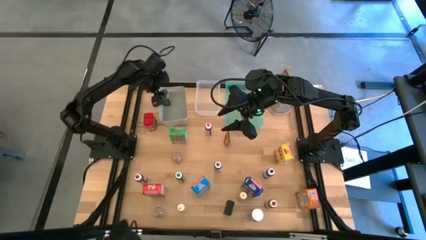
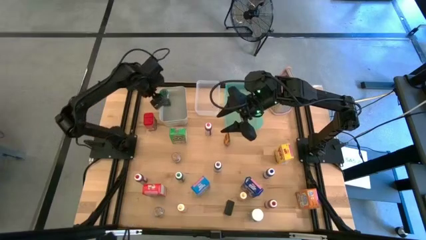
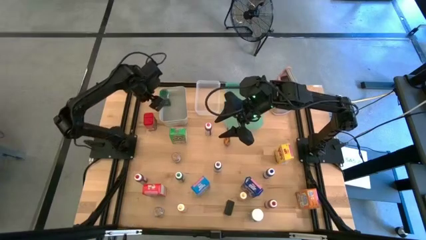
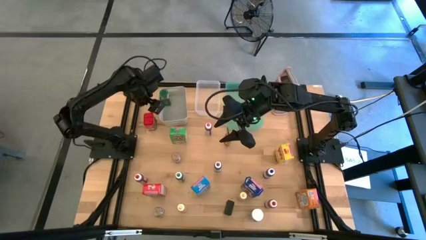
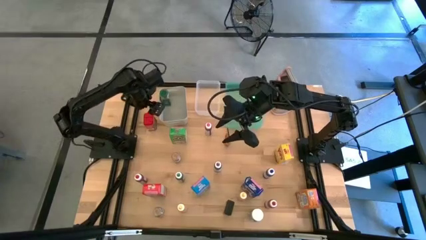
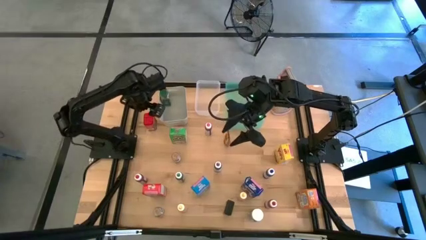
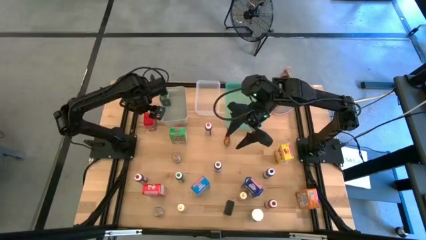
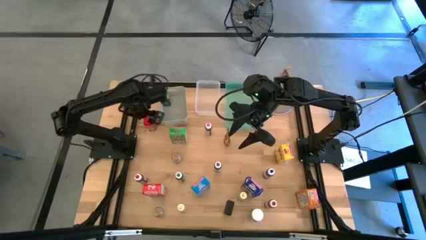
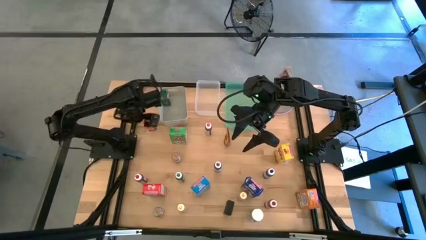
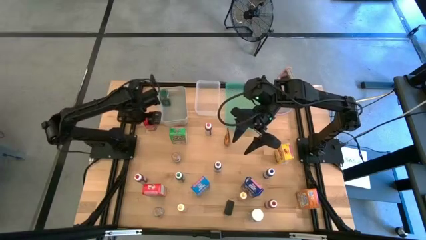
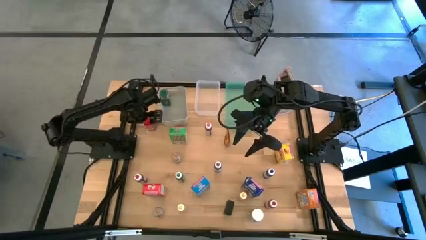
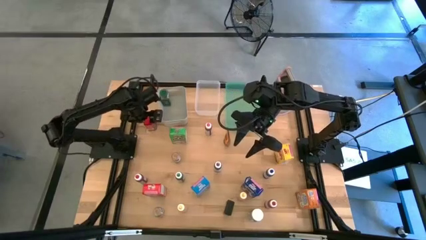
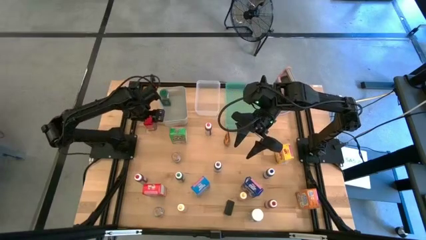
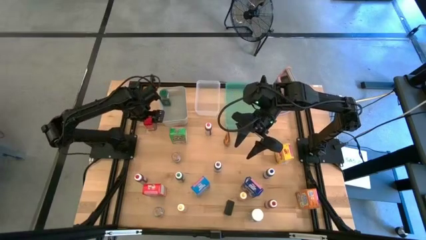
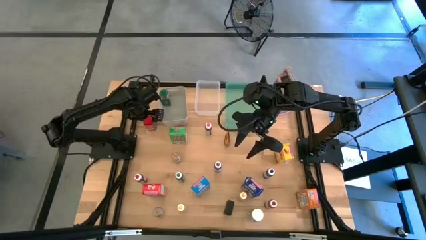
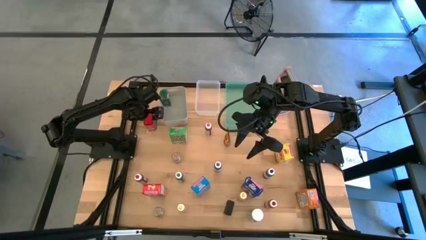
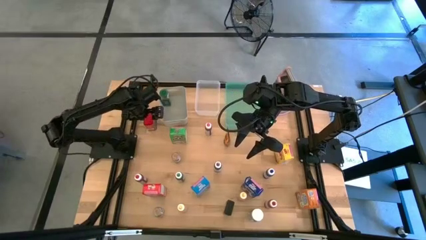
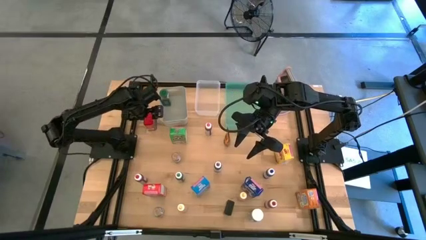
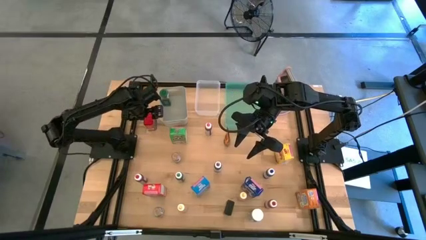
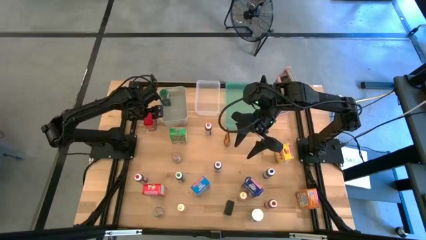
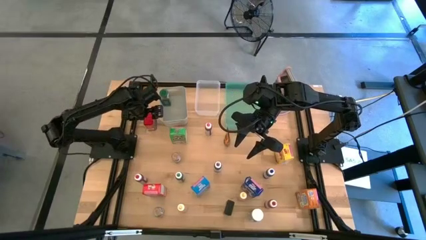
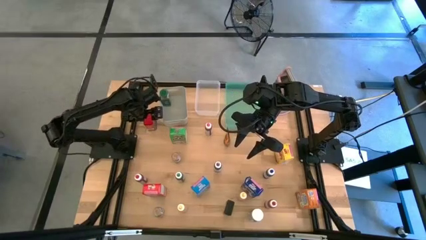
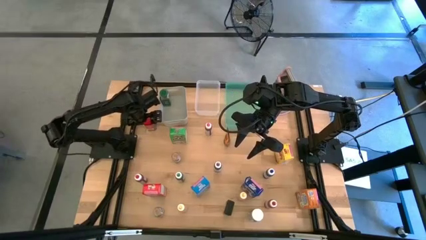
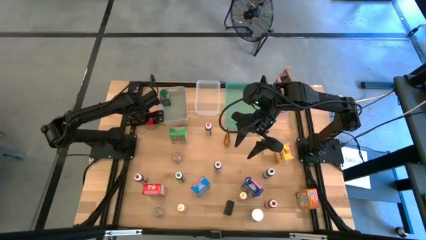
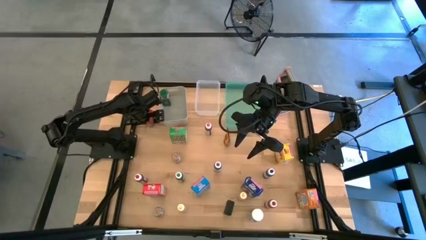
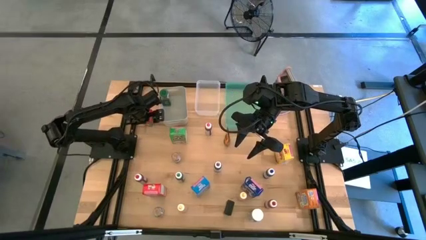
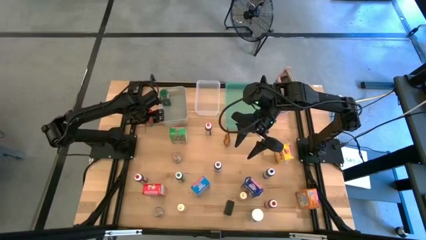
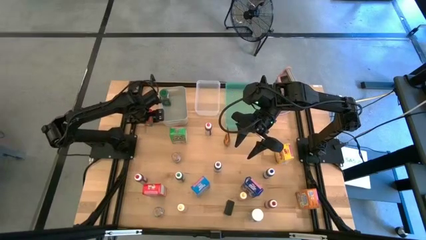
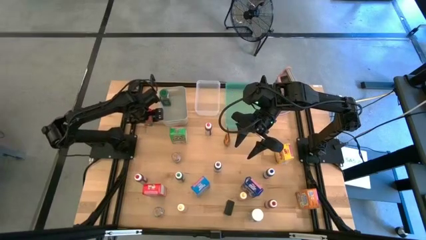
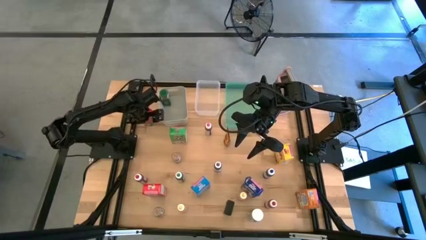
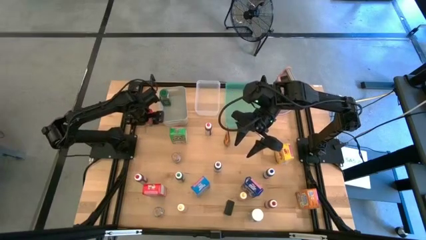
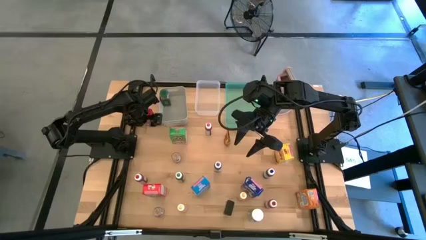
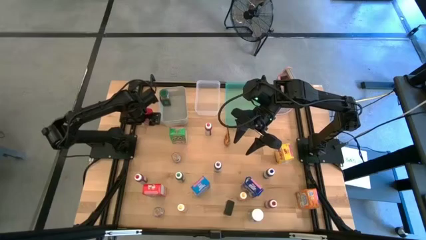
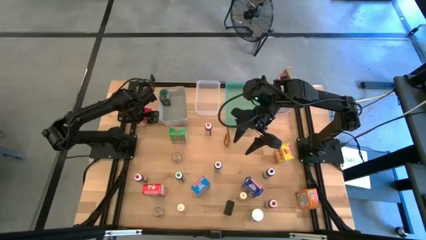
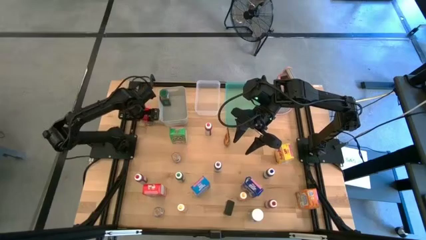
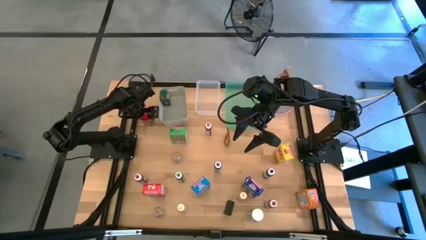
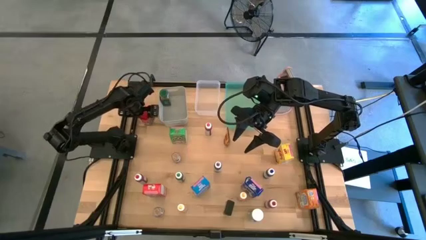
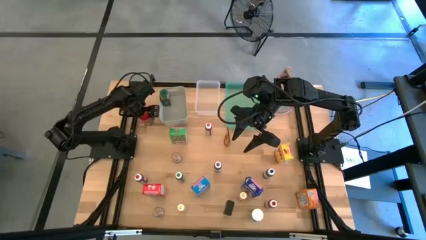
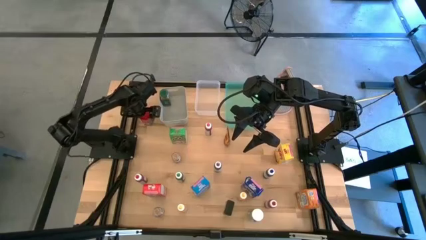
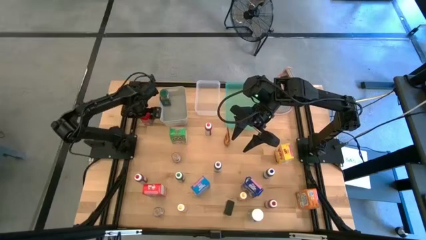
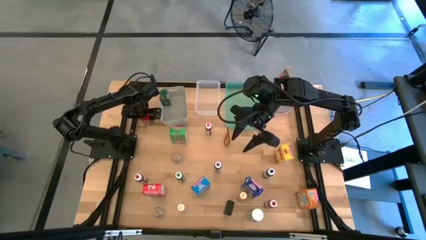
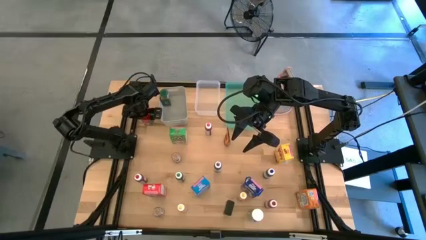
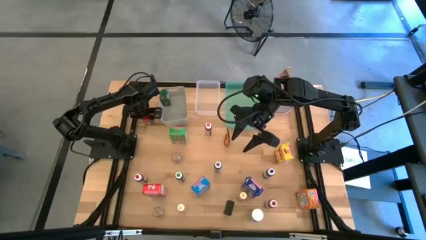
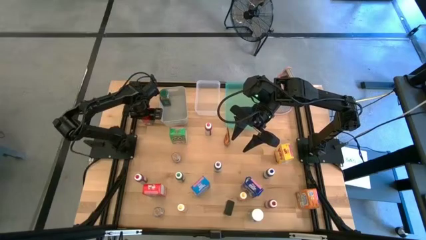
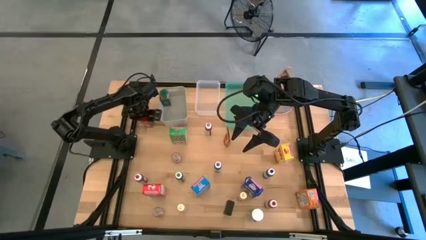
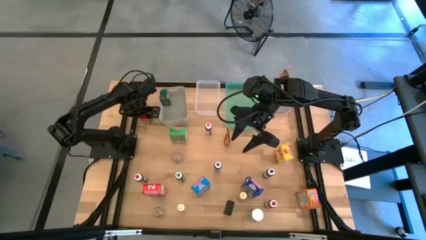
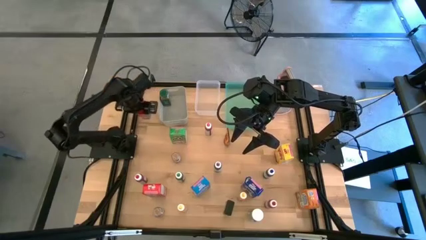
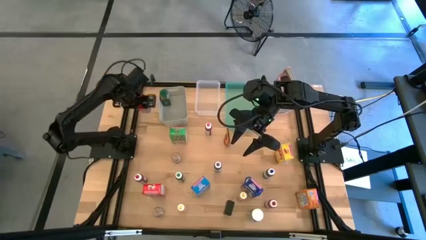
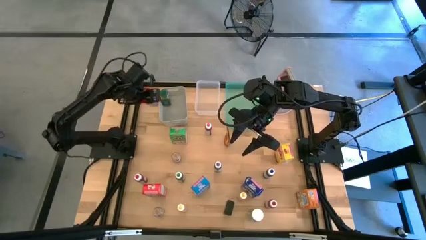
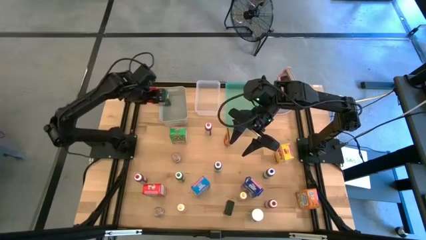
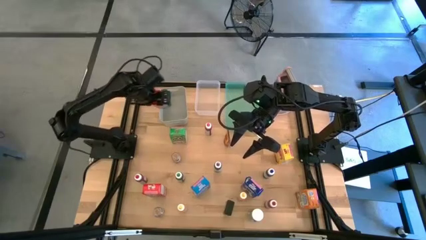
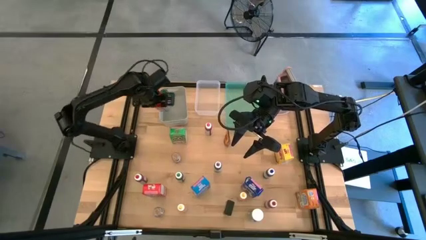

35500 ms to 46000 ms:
Task: Pick & Place Kitchen Items
Put the red seasoning can into the gray bin

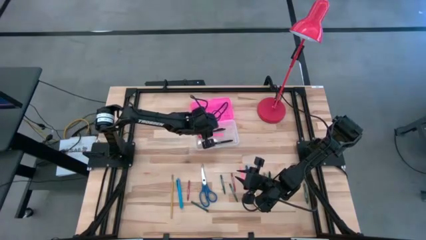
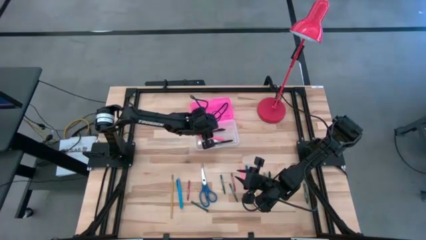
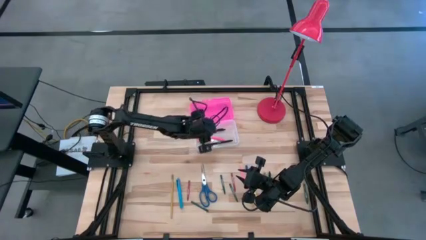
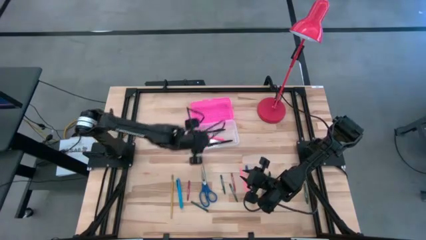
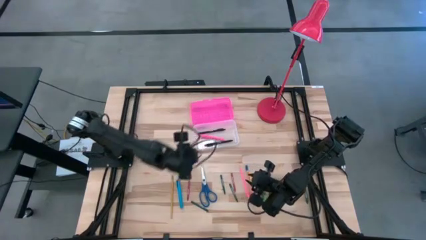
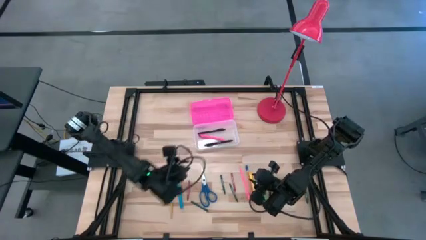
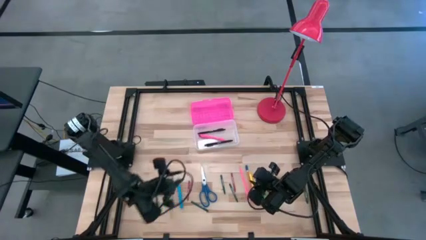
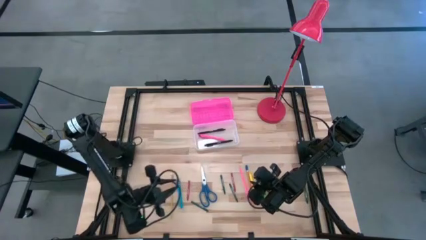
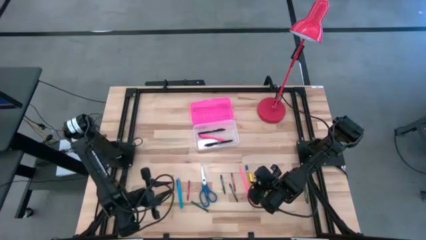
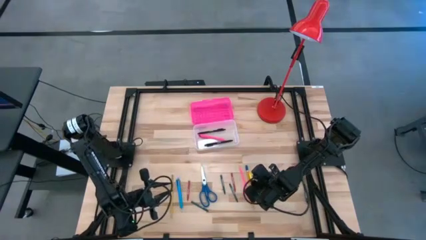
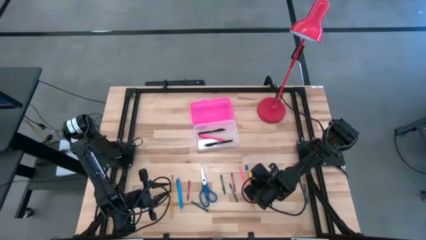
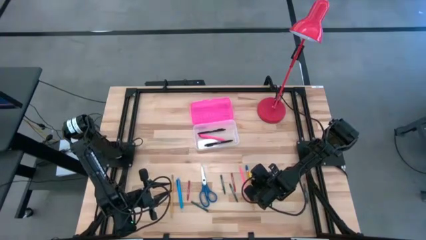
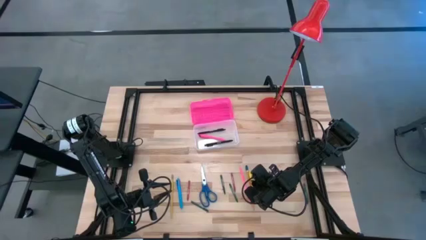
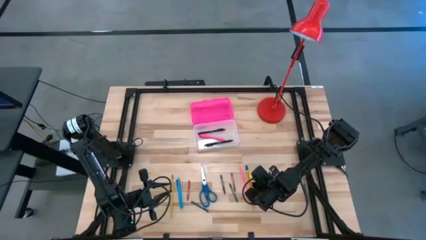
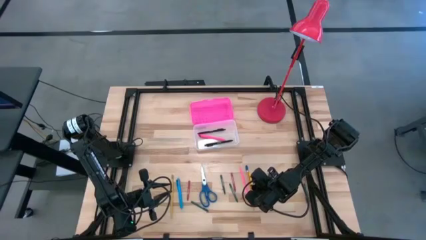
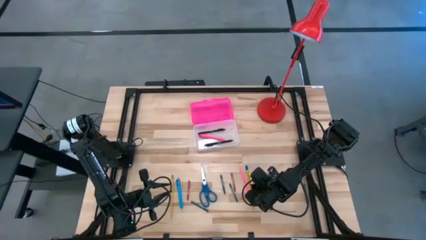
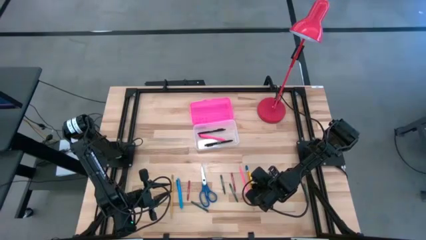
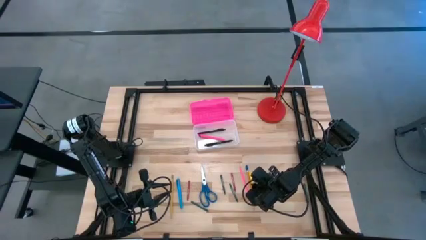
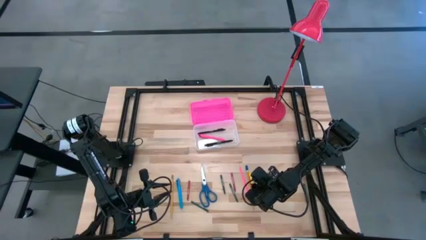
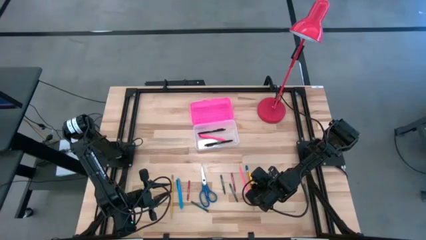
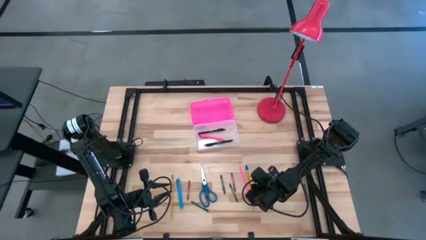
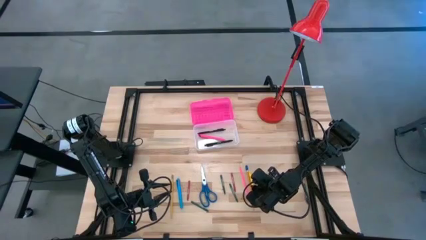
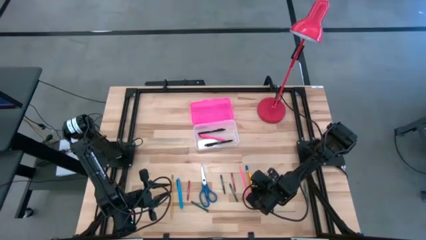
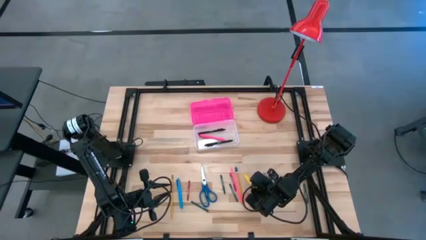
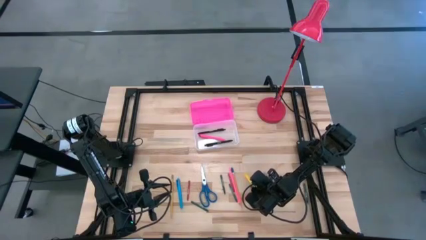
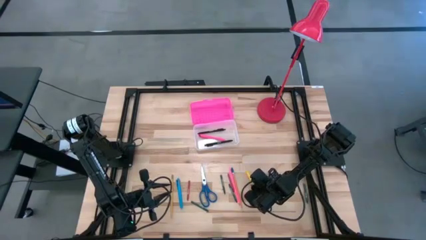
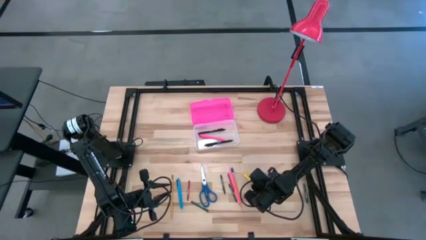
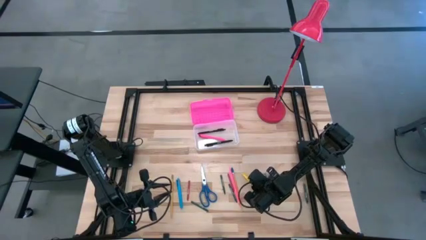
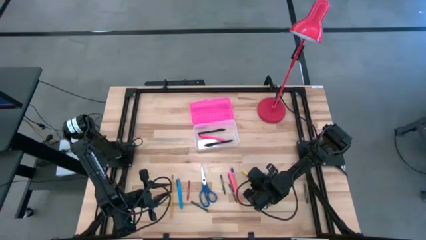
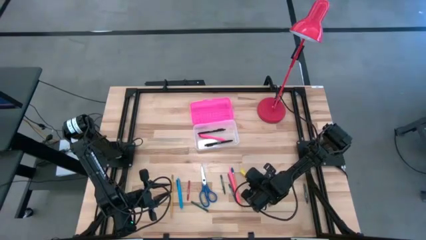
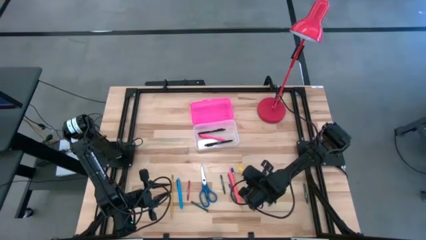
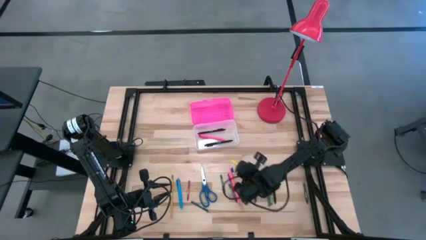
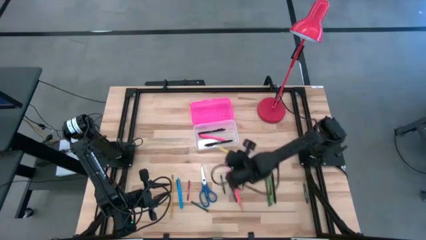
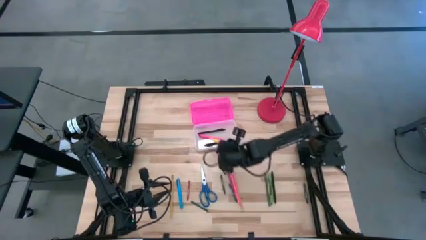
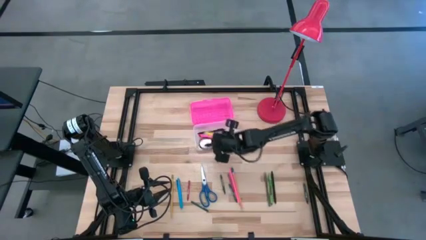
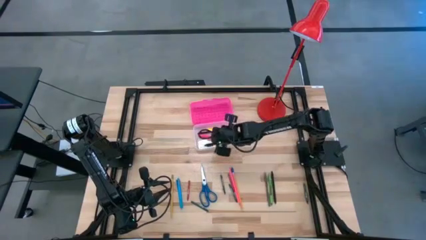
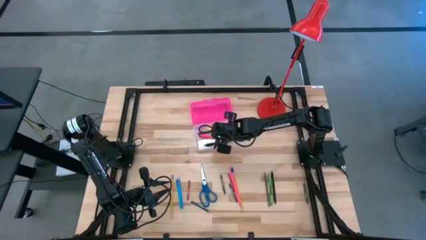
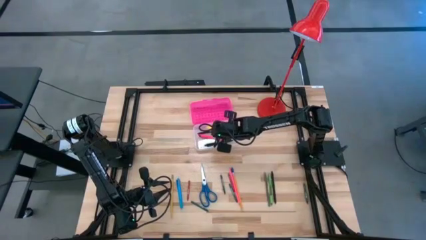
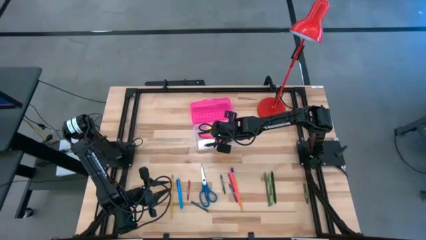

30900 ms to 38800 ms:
Task: Pick & place school supplies into a supply box
Put the yellow pen into the pink supply box
